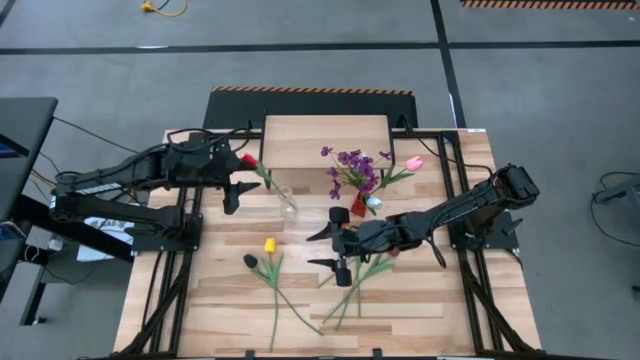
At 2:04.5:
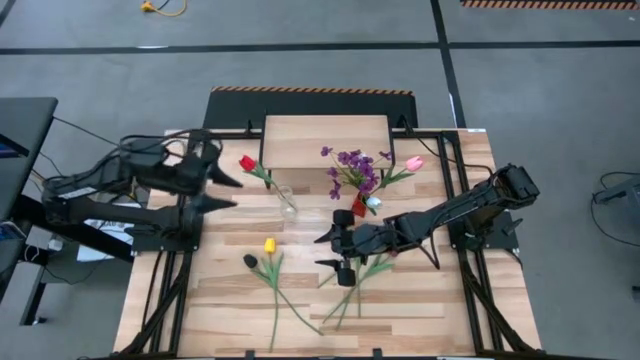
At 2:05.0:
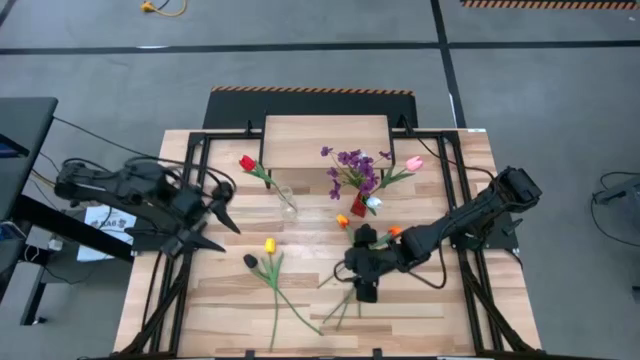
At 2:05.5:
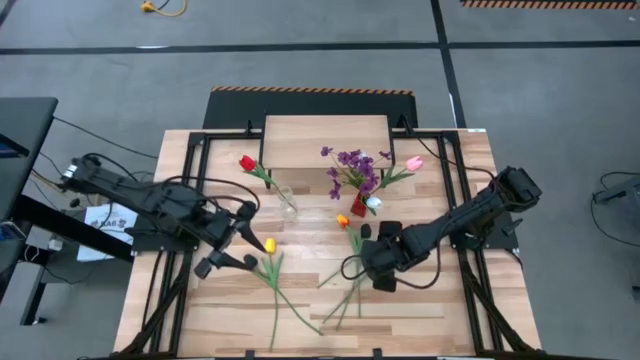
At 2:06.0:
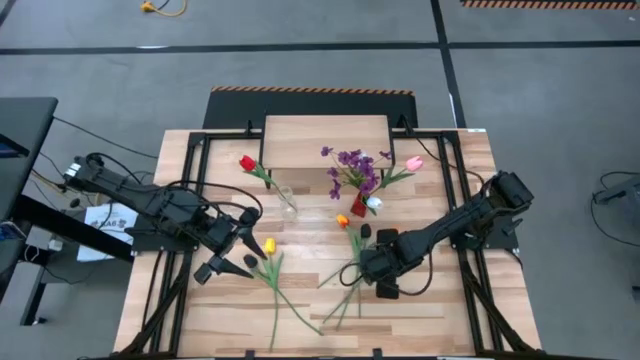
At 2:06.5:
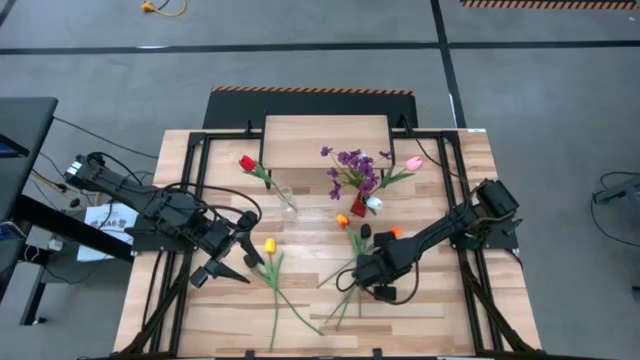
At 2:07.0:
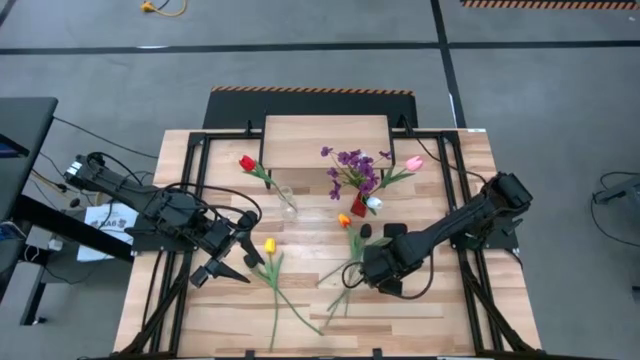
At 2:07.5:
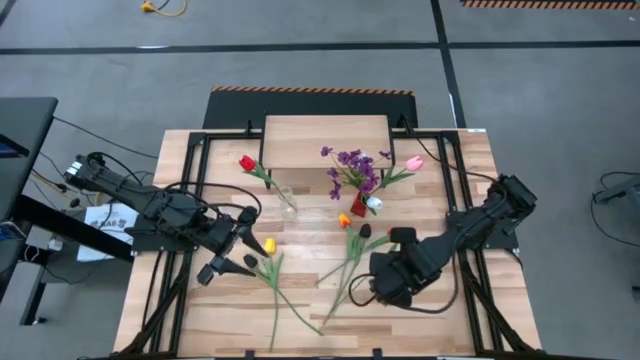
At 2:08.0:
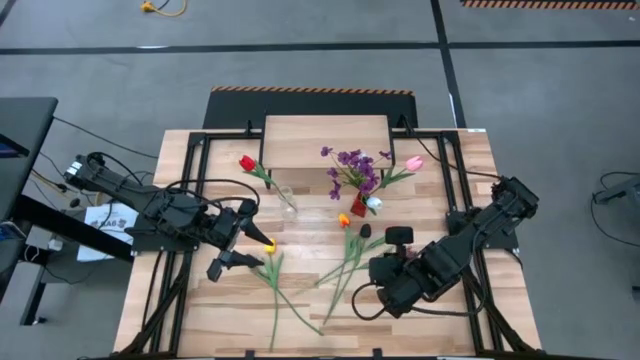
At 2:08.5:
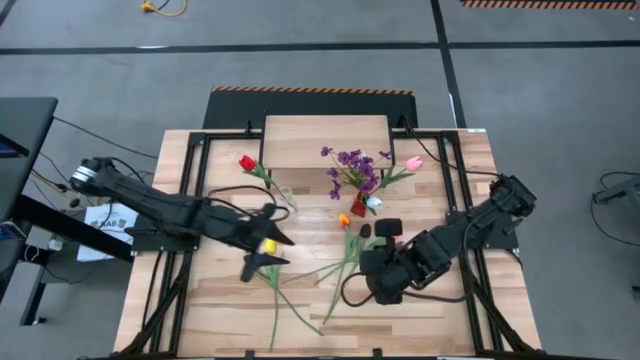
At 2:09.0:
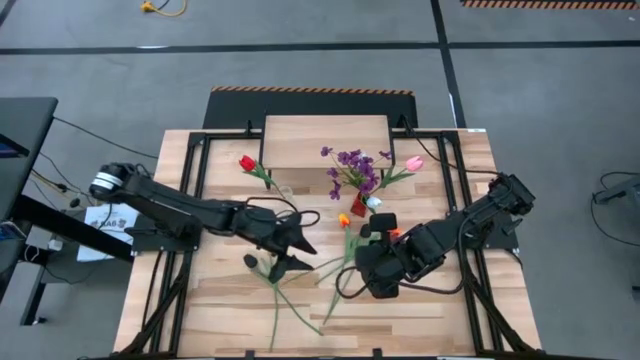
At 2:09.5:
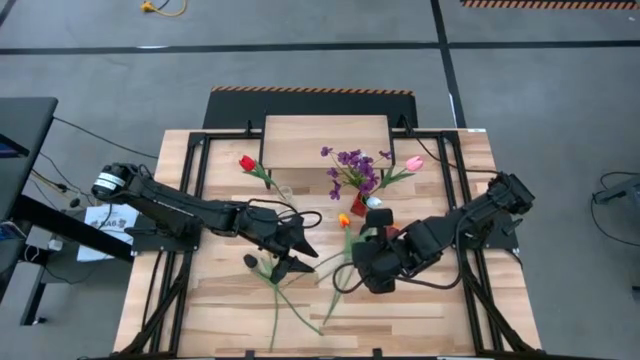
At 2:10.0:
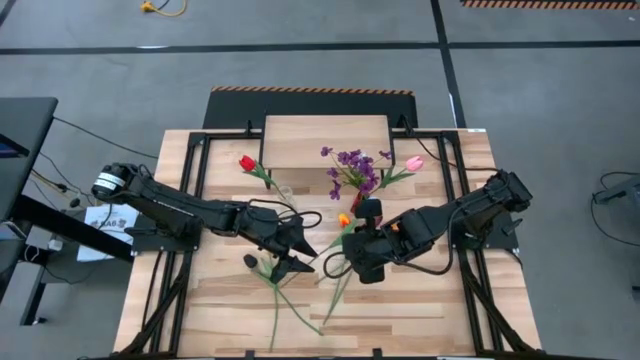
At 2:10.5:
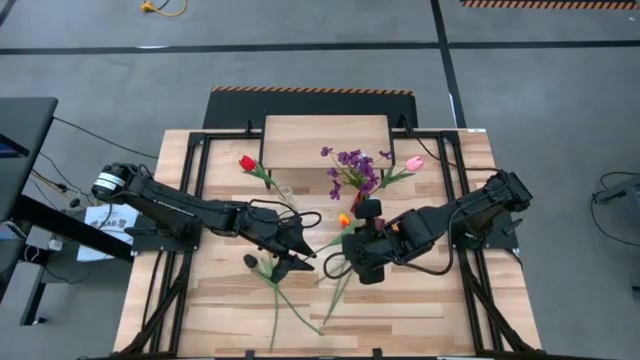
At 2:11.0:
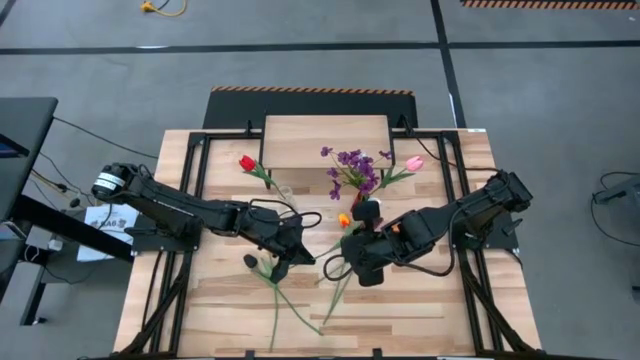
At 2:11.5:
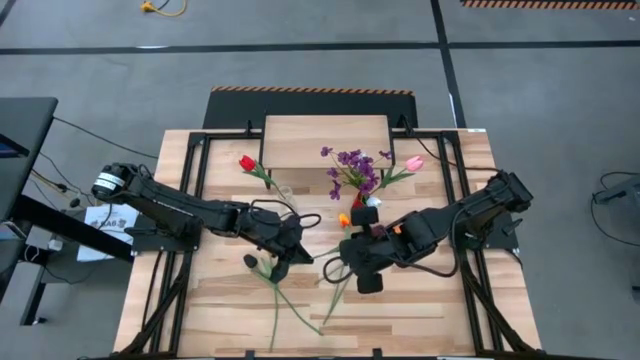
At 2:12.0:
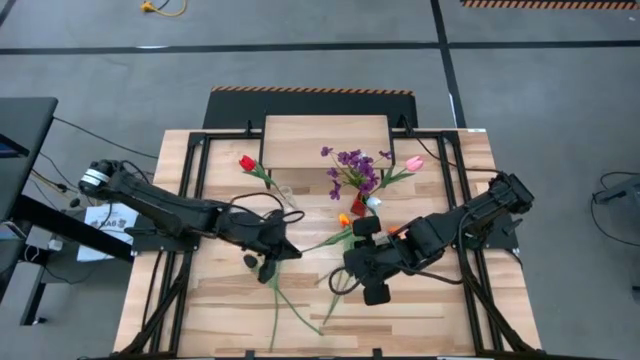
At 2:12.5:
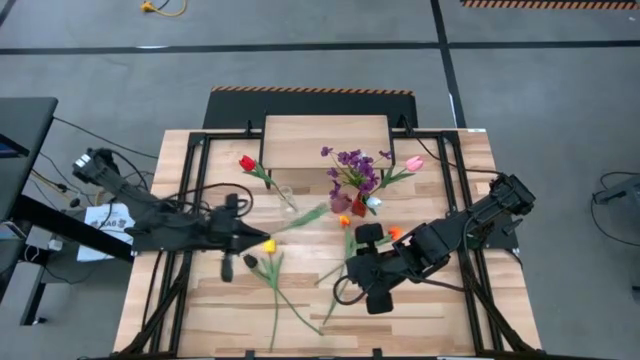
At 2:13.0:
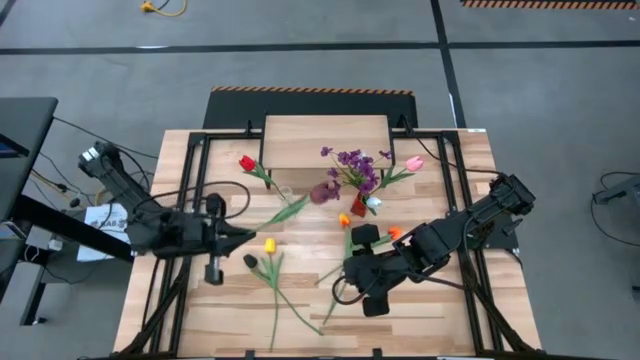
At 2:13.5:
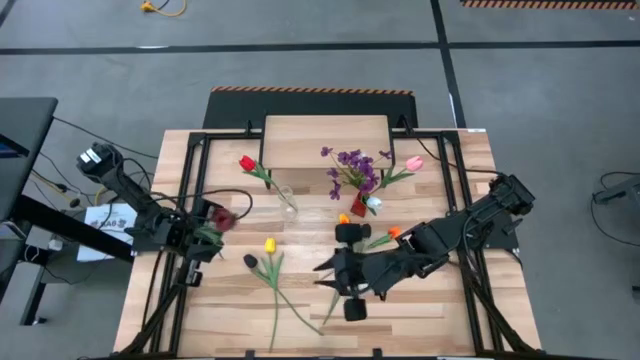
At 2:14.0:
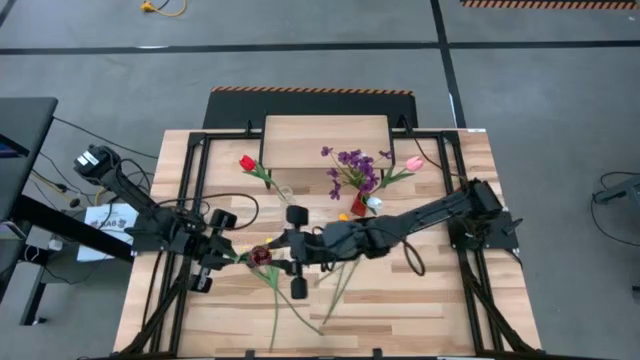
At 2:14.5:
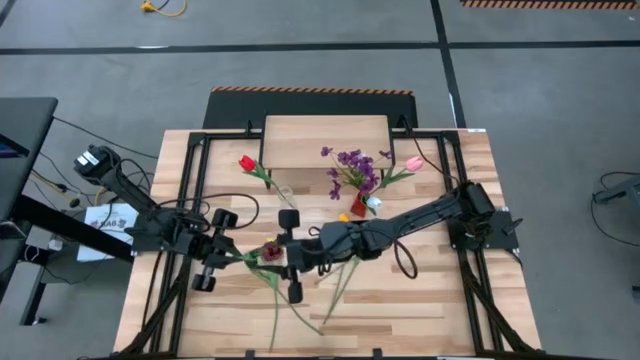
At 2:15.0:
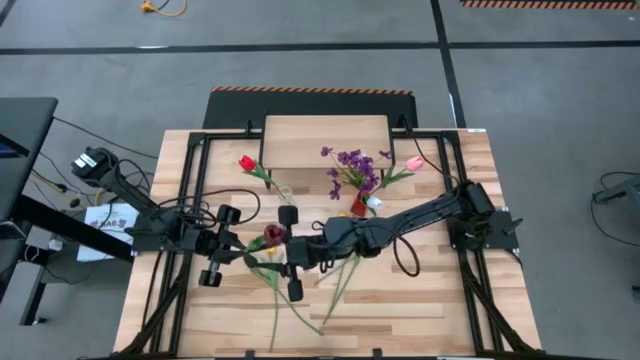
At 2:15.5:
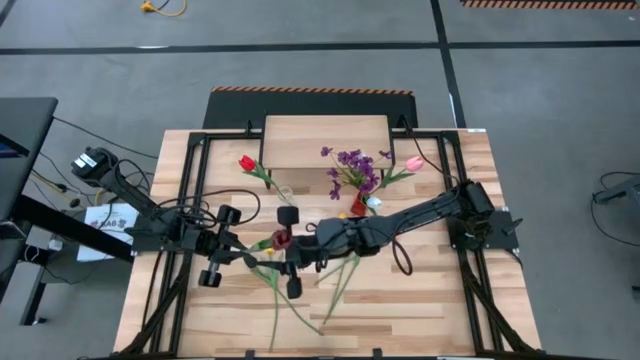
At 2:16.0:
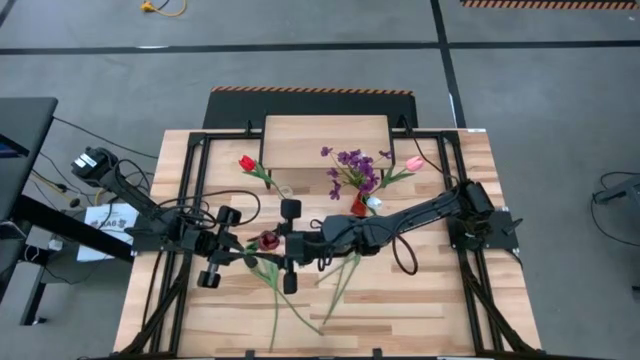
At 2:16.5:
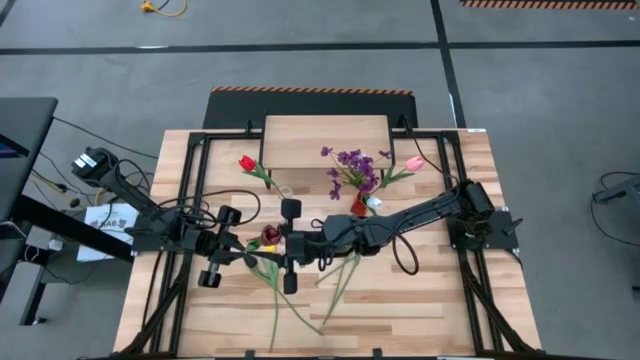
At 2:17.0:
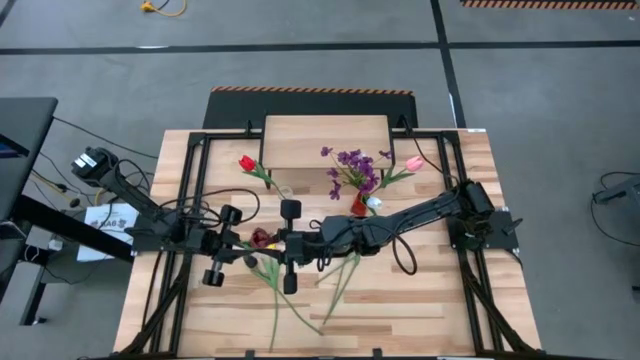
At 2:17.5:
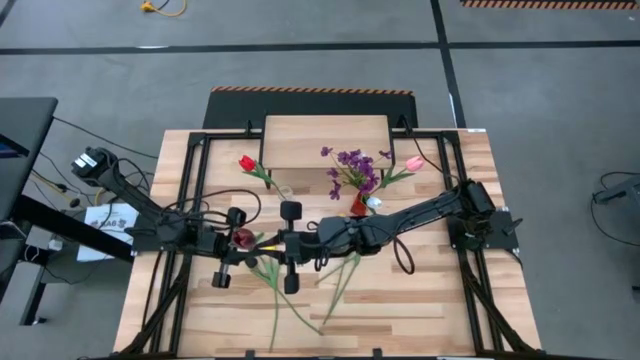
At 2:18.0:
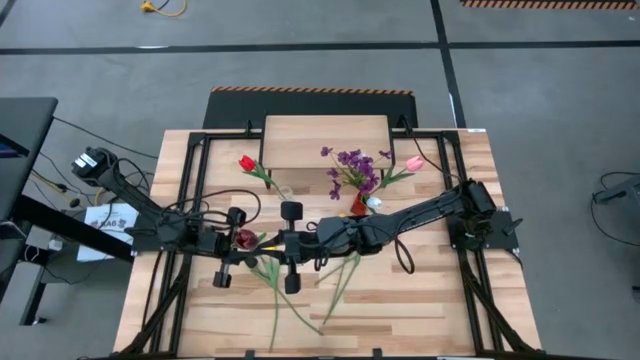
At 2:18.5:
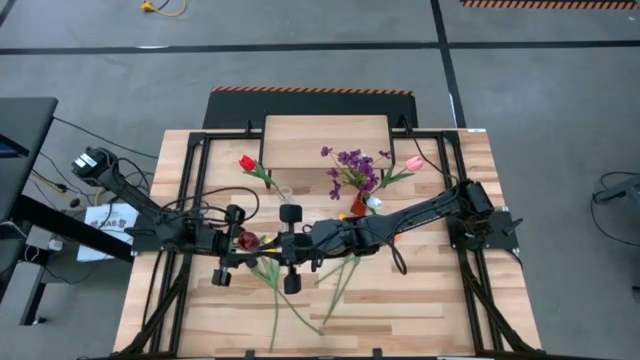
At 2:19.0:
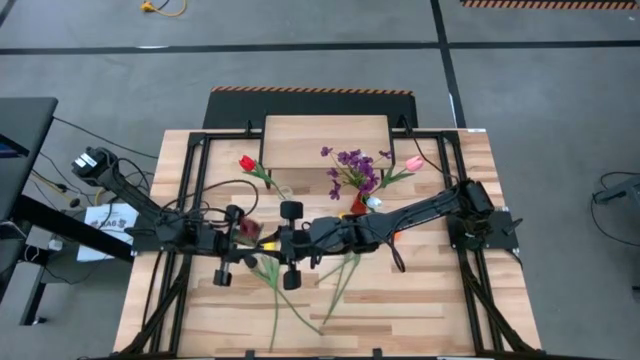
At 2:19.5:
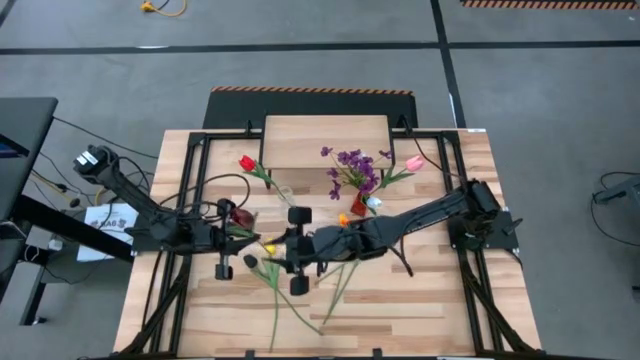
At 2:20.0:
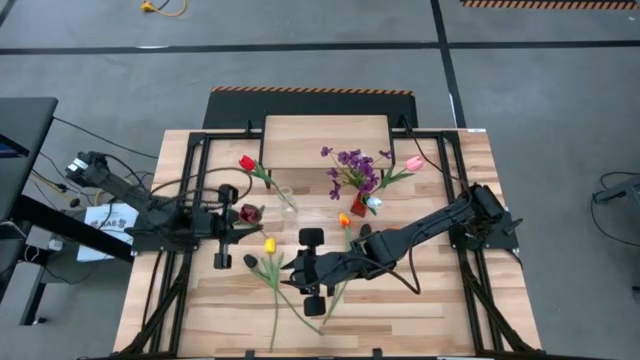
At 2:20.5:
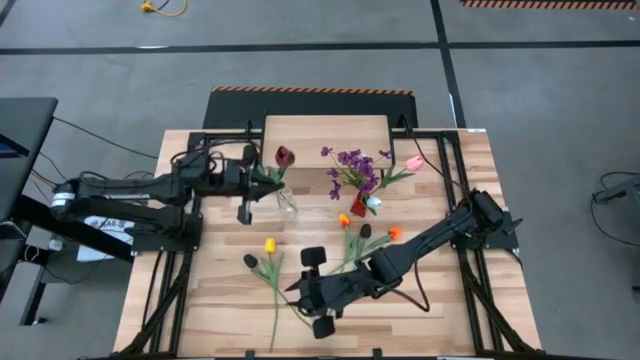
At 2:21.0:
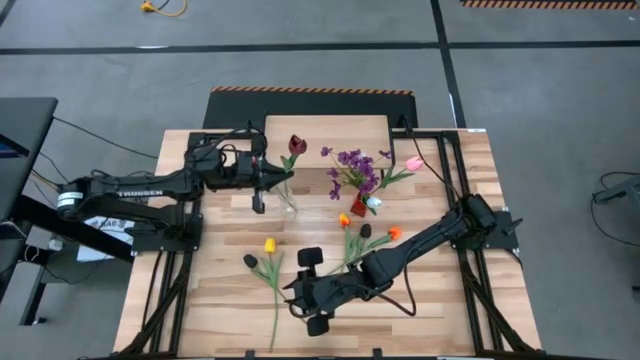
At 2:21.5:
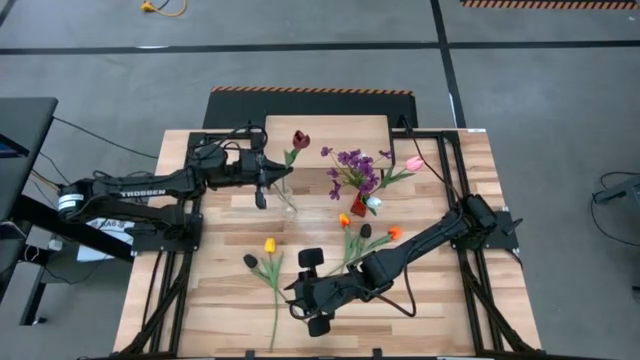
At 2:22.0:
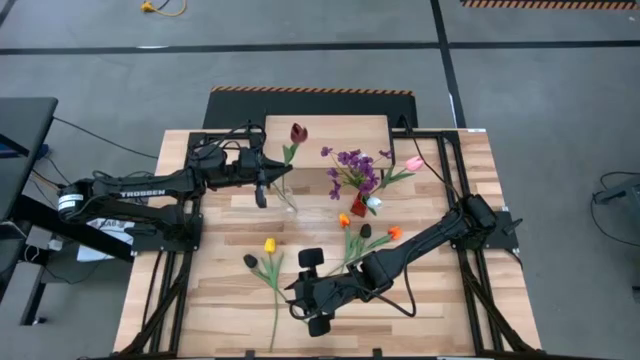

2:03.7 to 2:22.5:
Task: Pick and place flowers into a vace then onto a shelf
Put the dark red flower into the transparent flower vase

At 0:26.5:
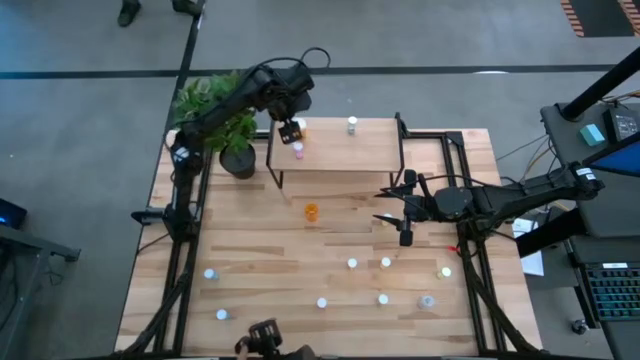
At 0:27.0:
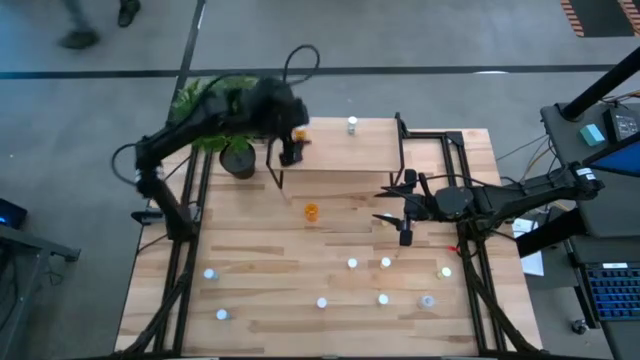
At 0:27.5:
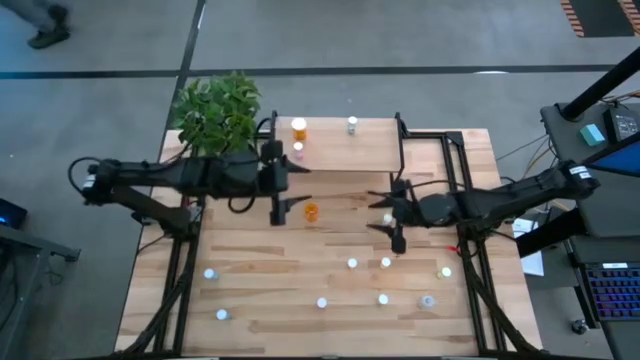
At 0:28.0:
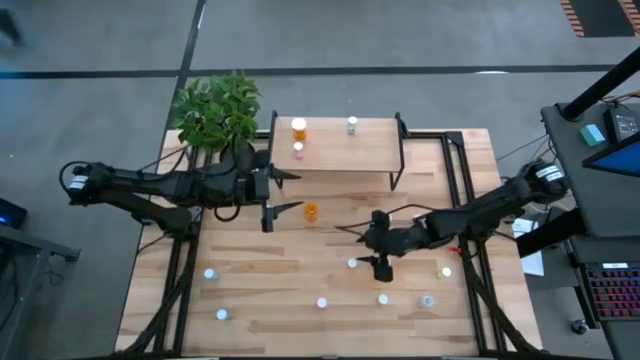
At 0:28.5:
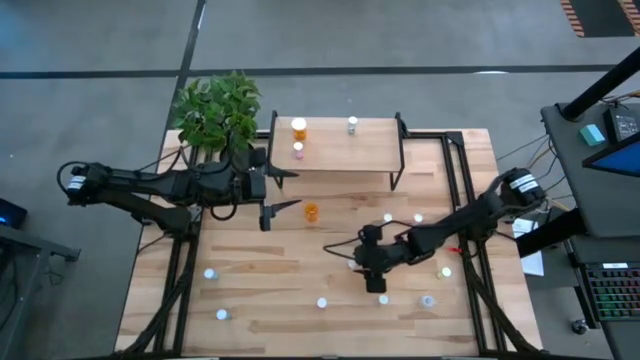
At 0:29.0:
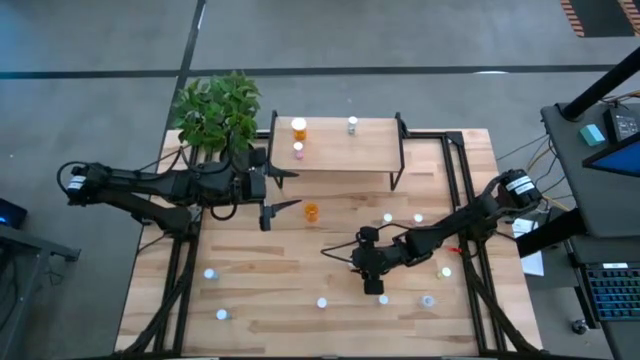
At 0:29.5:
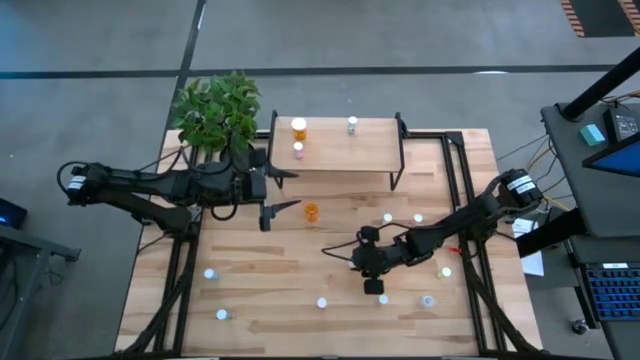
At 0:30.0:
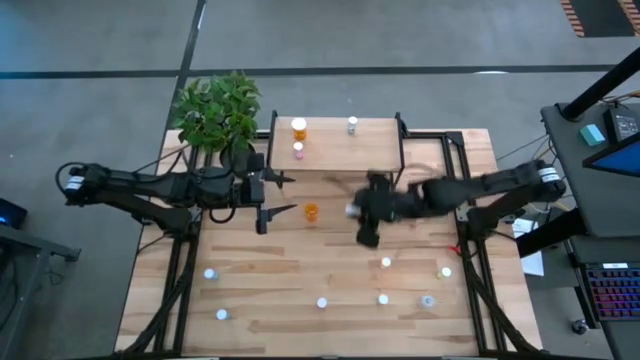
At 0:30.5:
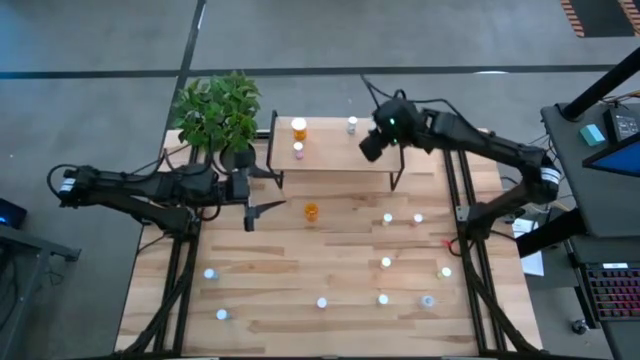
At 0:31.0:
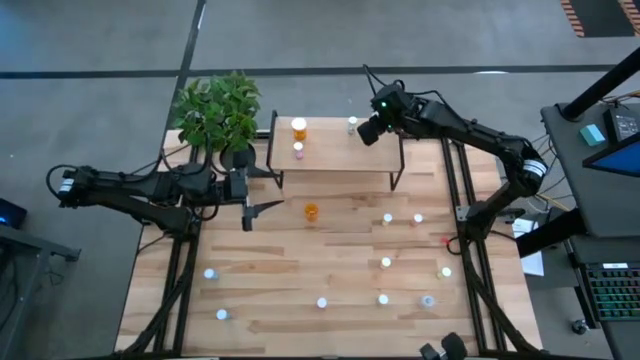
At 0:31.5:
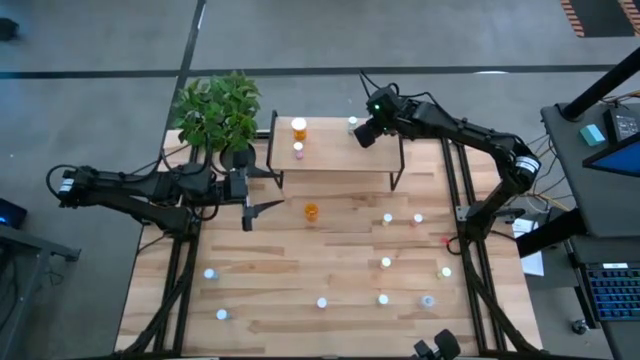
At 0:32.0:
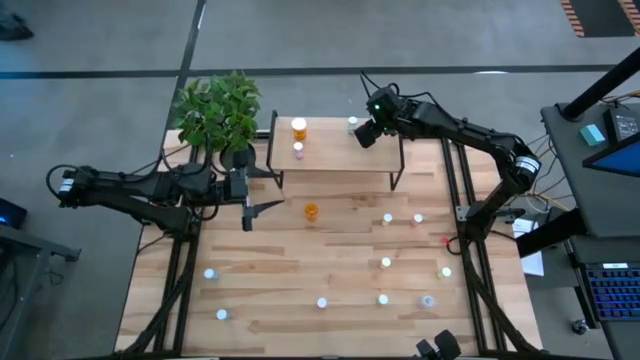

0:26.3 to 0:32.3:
Task: Pick and place medicine bottles onto shelf by color
Put the yellow pill bottle on the shelf
